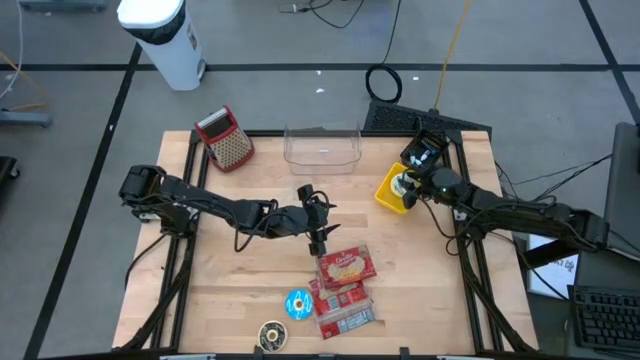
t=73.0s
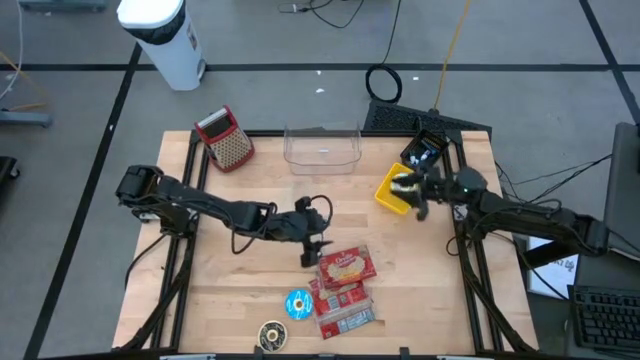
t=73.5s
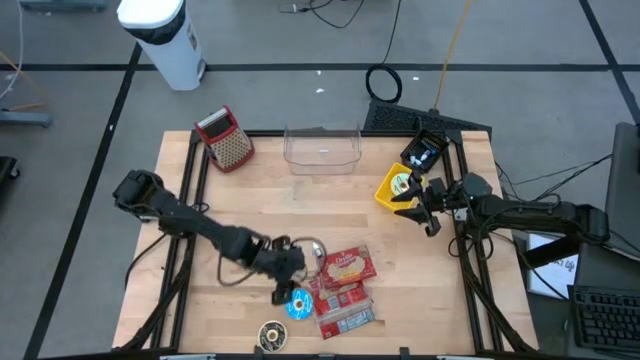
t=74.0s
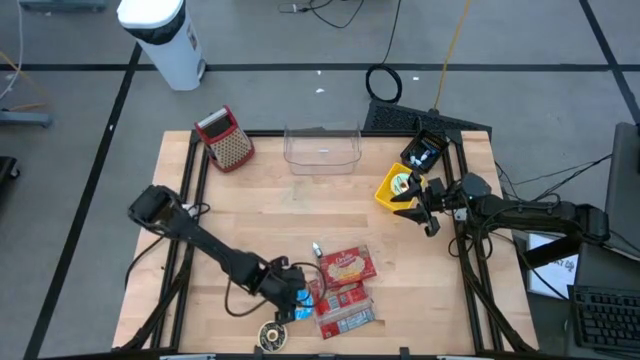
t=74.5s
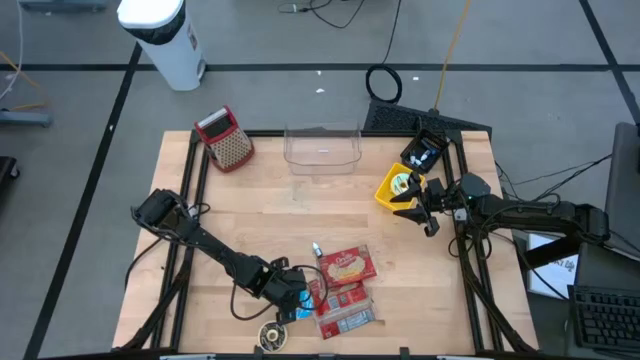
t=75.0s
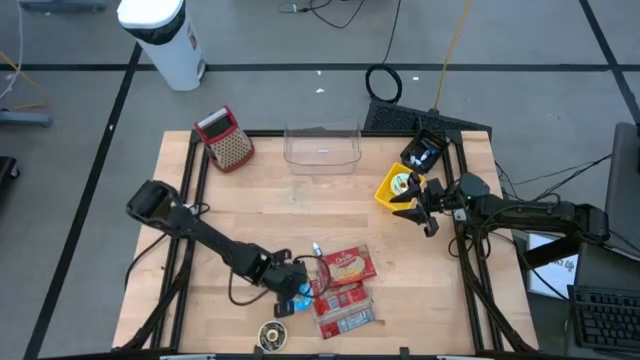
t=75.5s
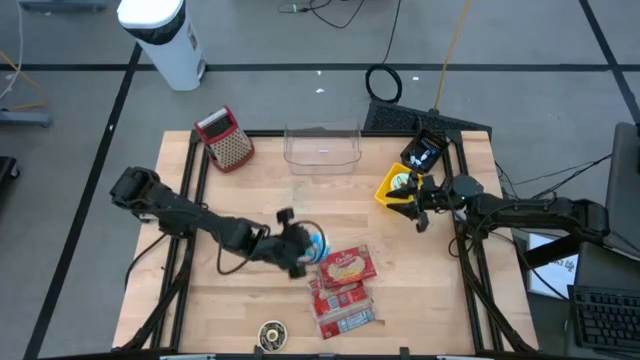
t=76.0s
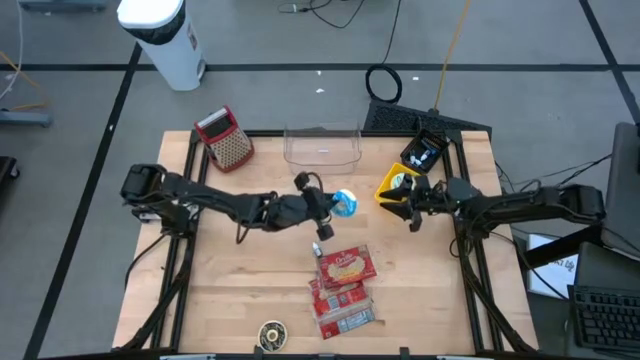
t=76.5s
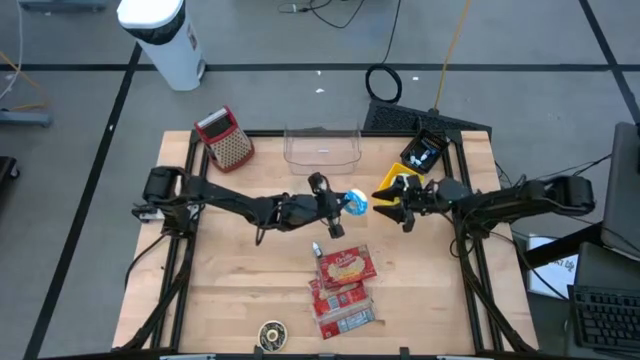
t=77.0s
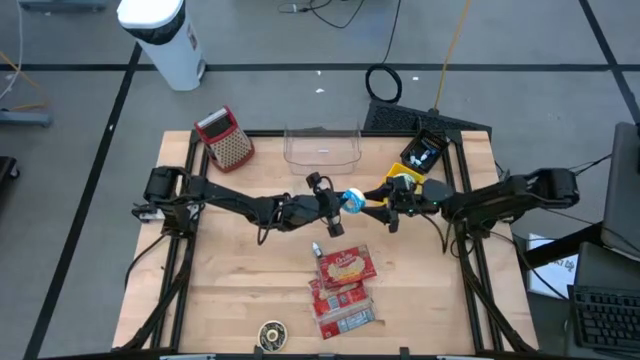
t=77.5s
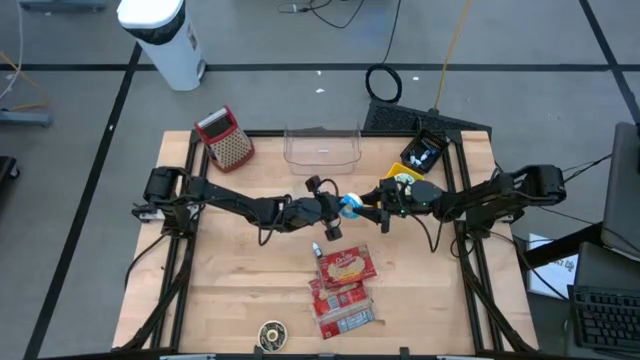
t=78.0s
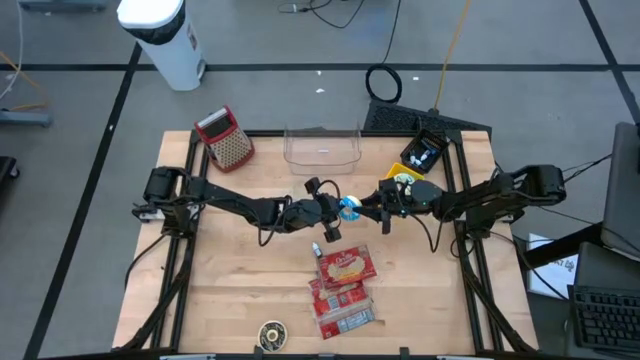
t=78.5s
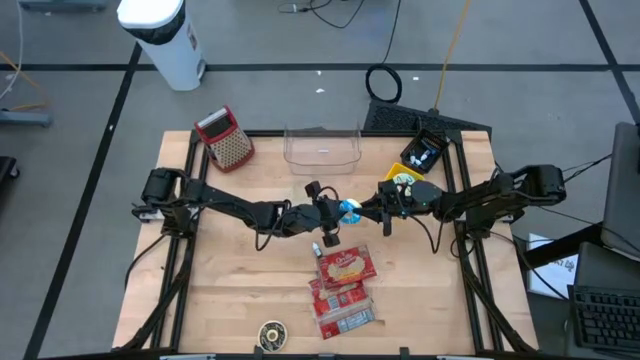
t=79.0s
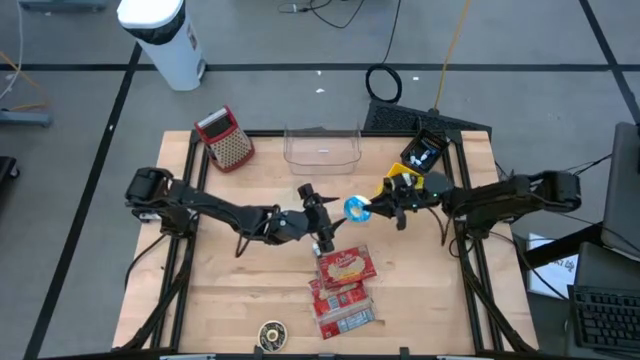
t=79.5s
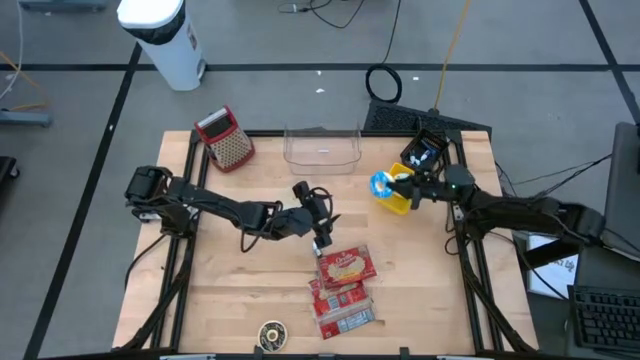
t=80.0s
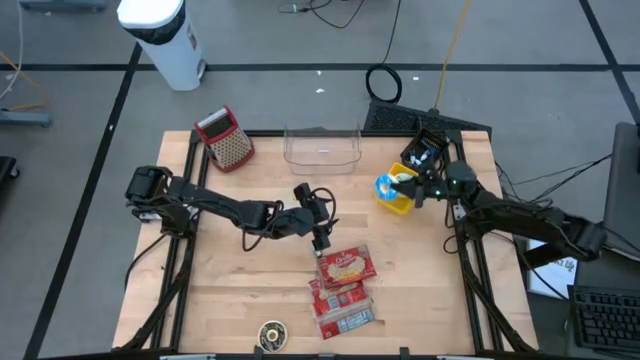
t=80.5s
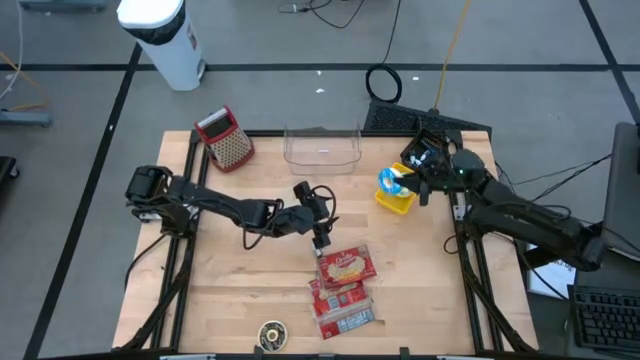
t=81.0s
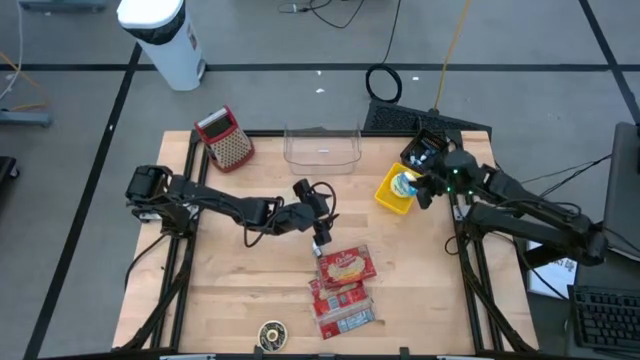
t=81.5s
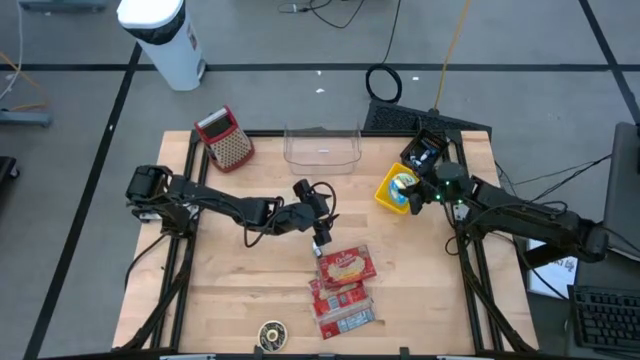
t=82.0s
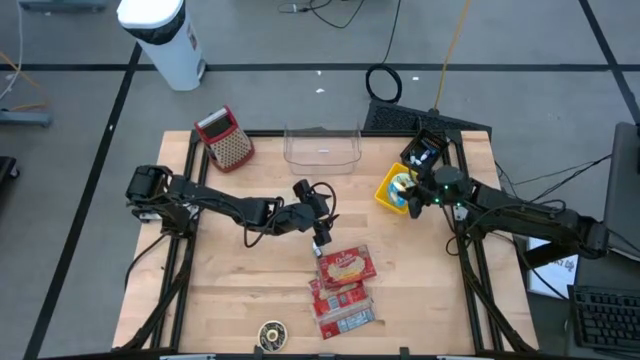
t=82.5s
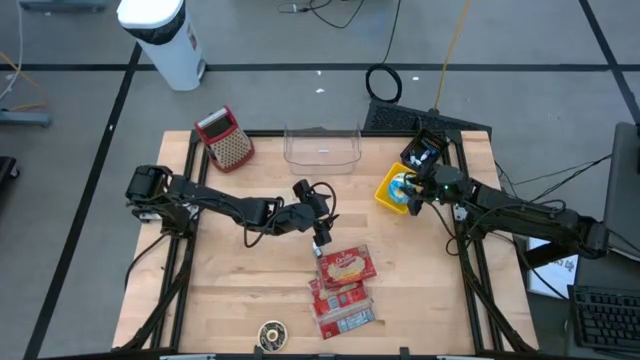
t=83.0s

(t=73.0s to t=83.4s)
Put the blue donut into the yellow bin

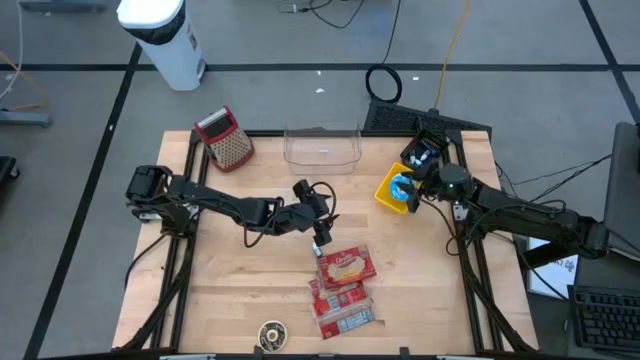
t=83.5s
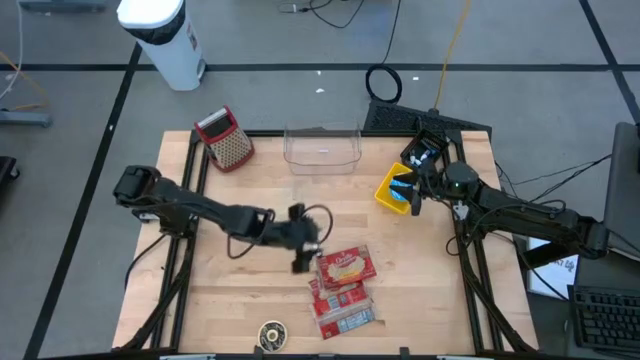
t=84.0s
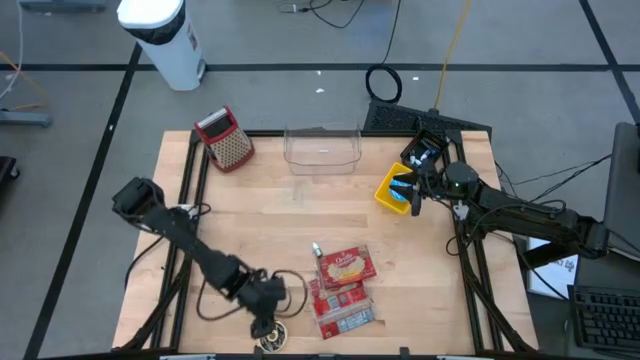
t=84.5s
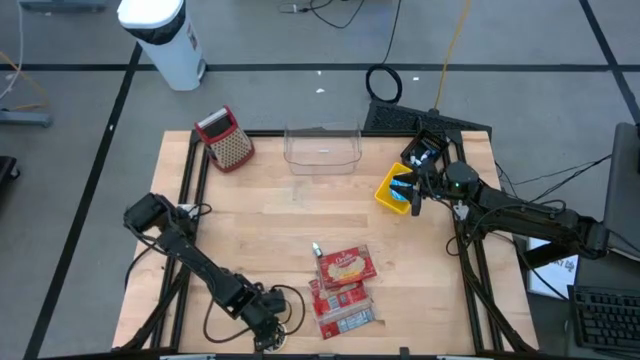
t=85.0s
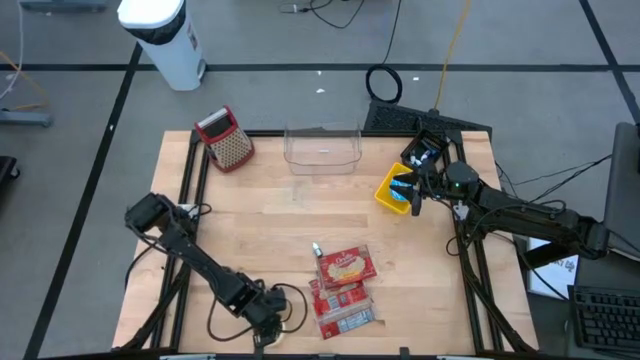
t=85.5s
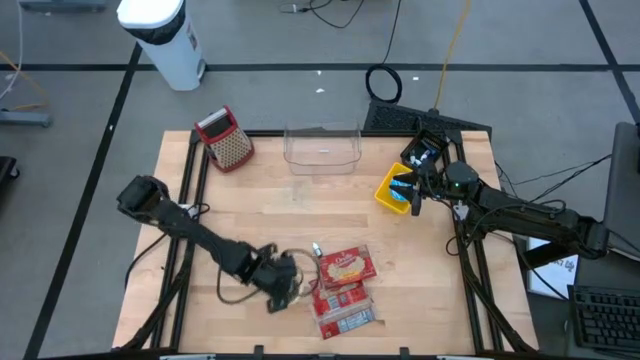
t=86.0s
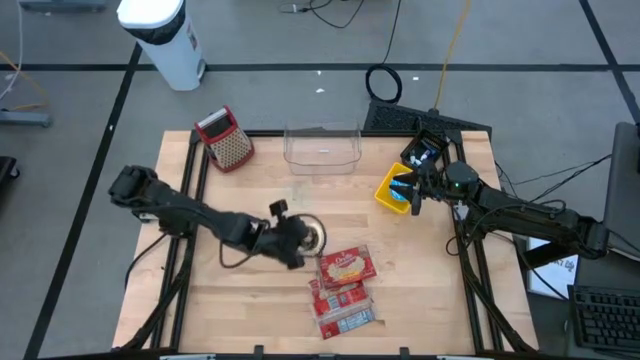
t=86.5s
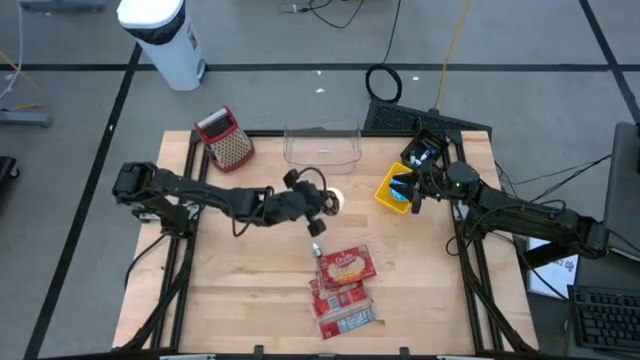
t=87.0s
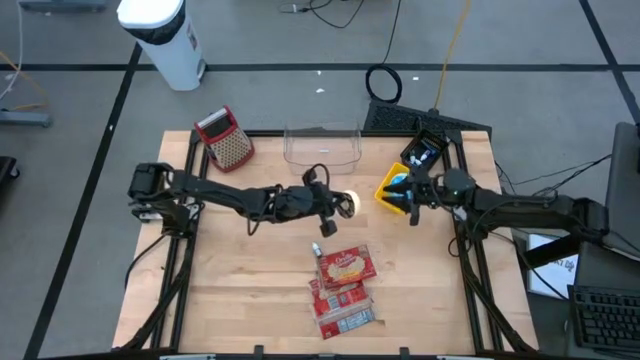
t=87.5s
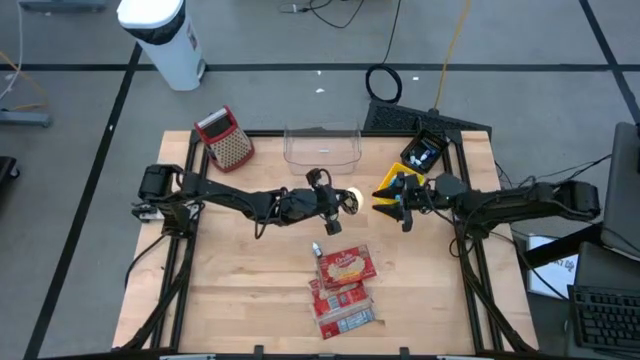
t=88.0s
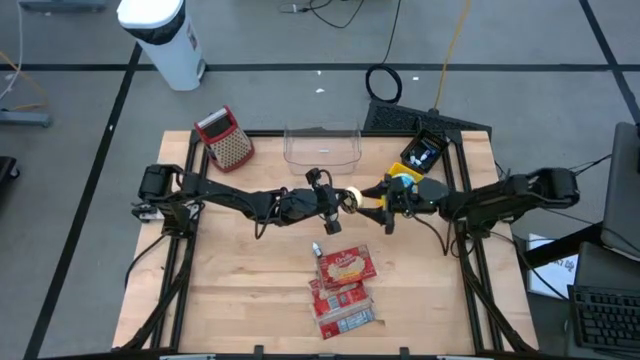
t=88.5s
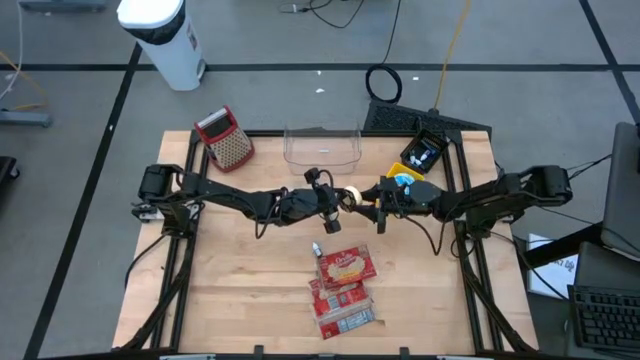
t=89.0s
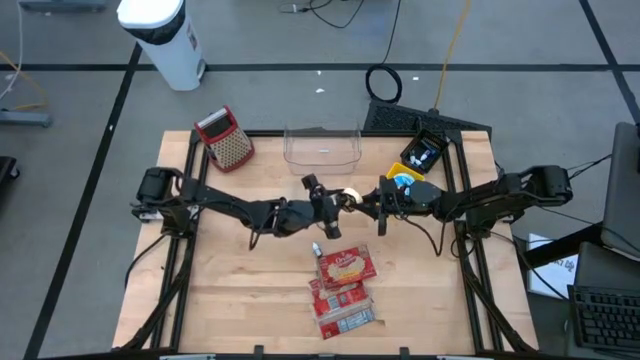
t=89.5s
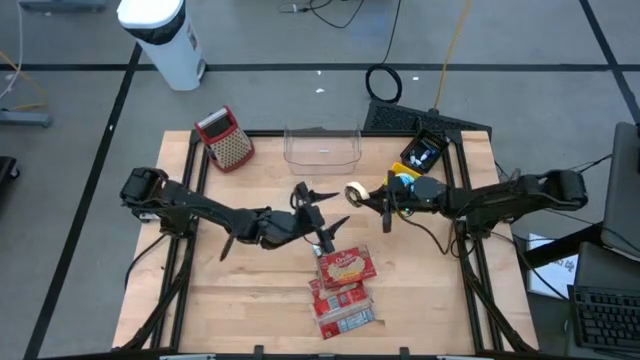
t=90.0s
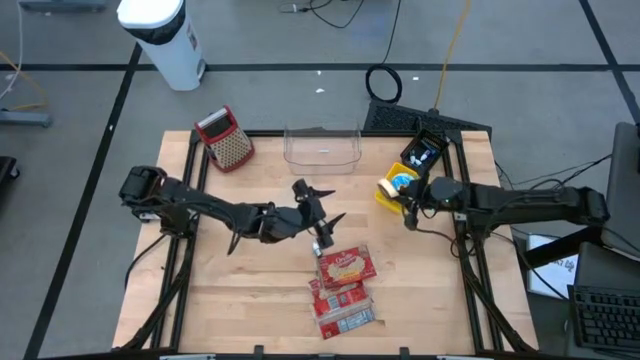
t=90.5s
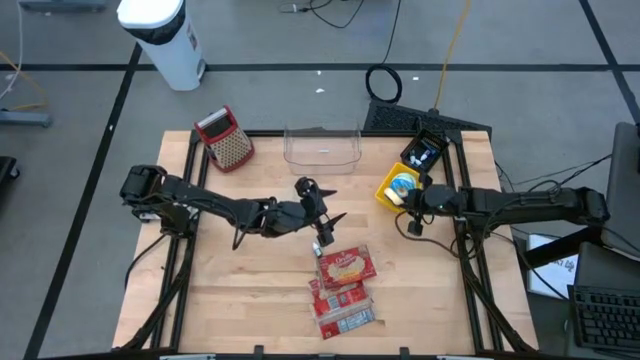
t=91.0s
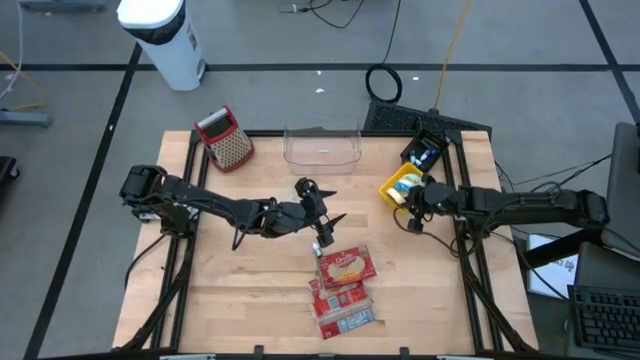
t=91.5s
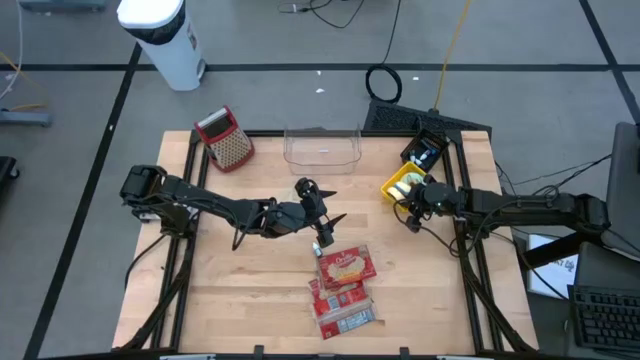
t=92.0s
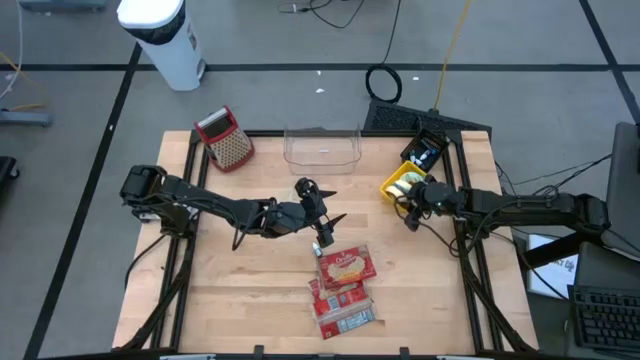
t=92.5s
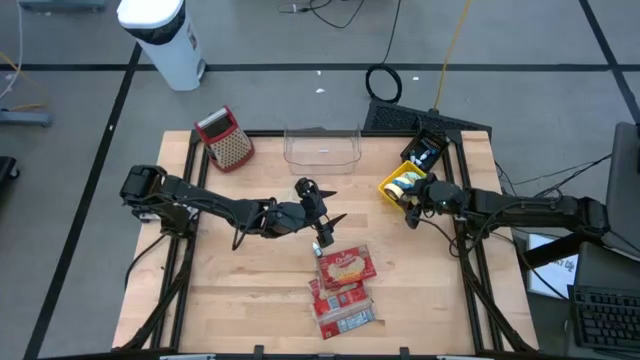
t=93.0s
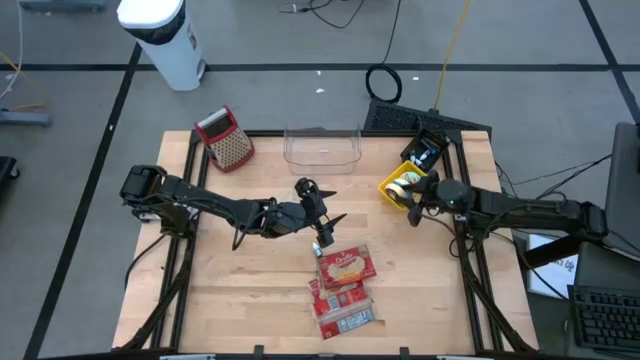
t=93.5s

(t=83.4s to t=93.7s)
Put the black donut into the yellow bin
